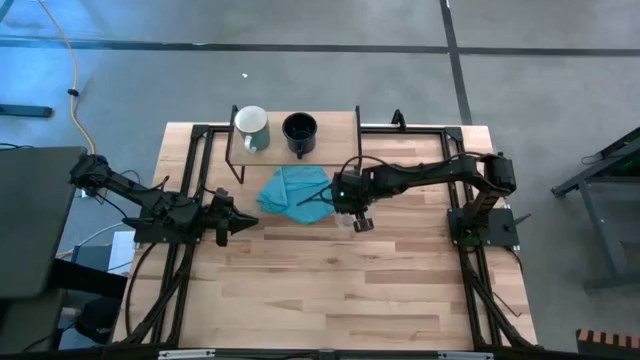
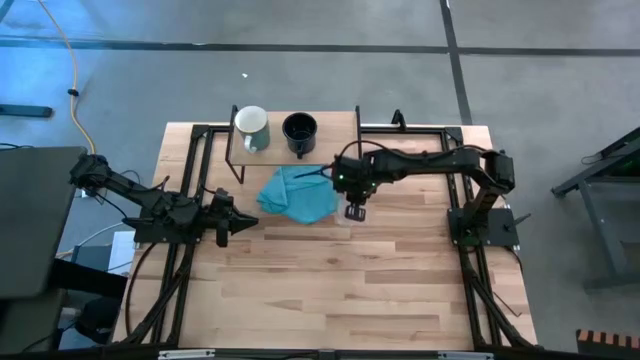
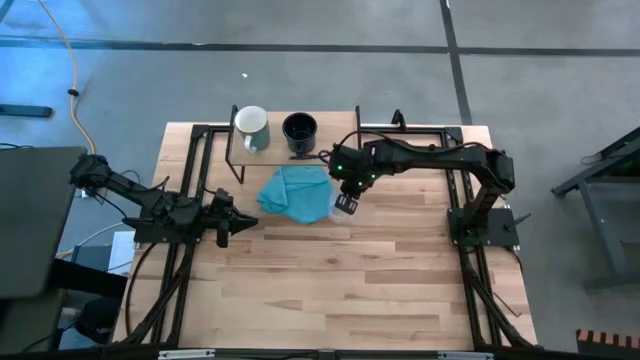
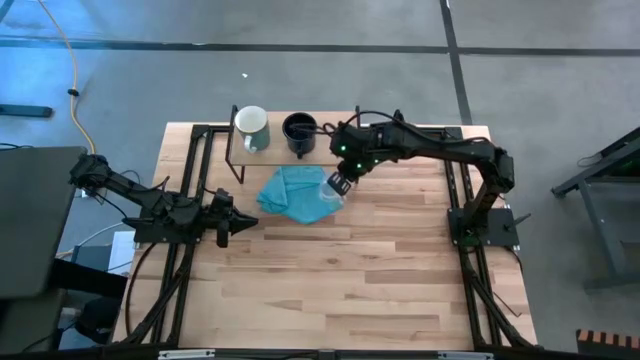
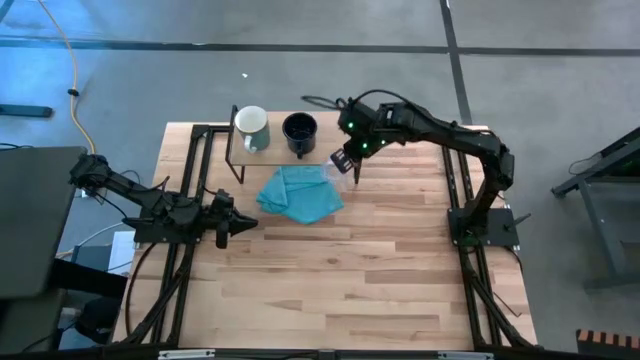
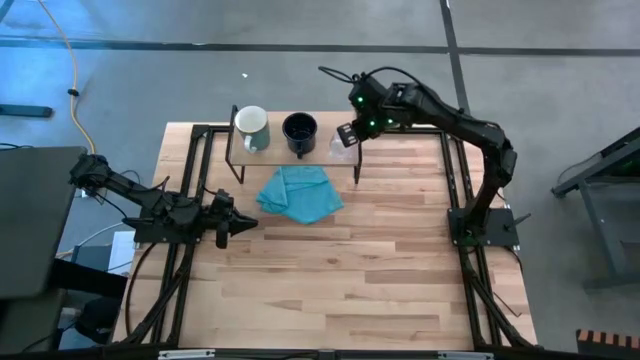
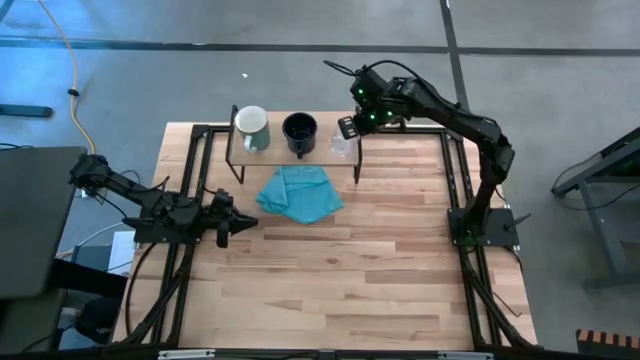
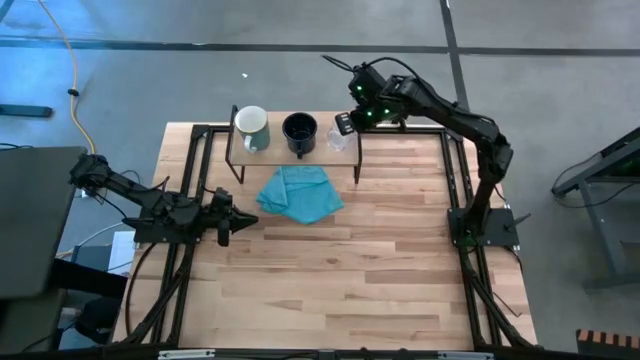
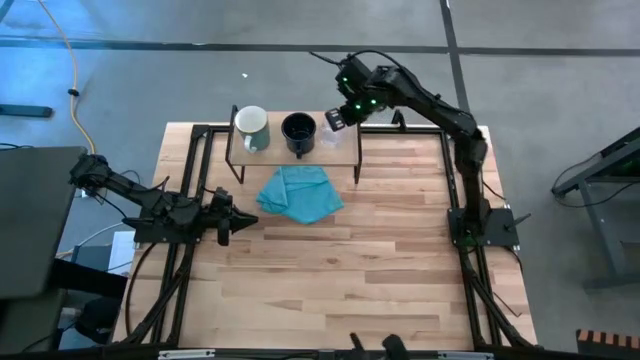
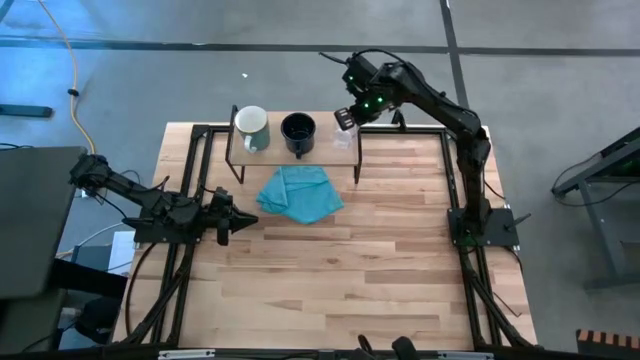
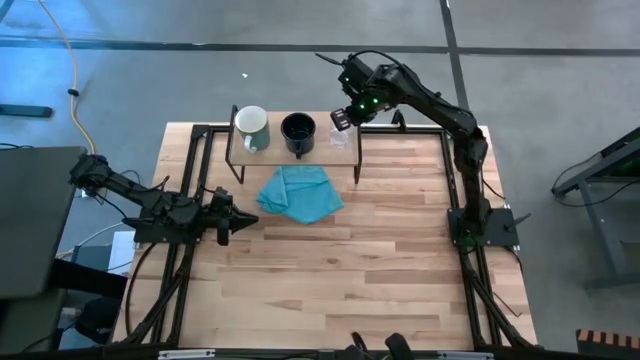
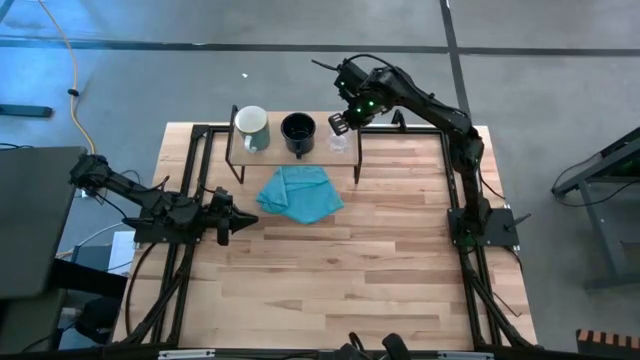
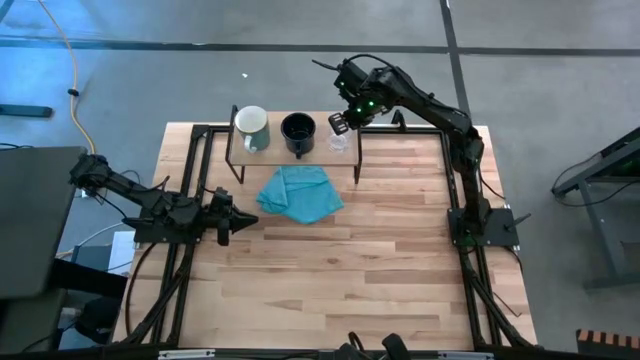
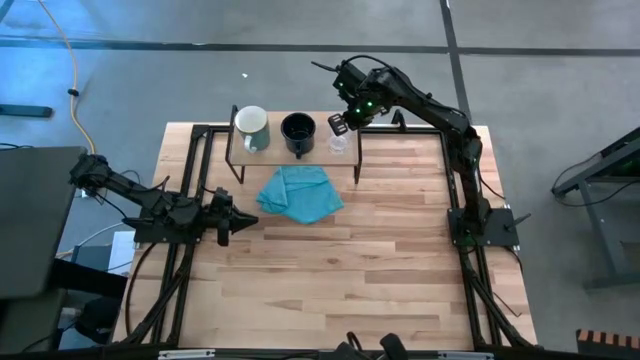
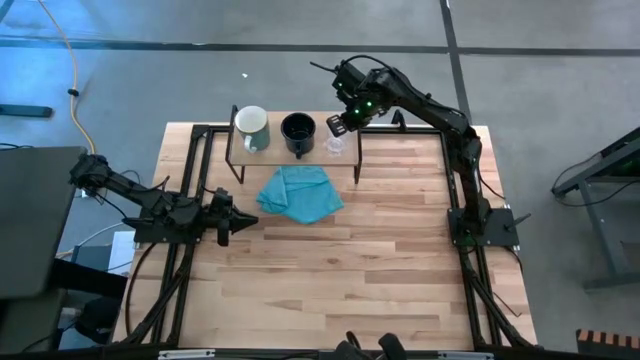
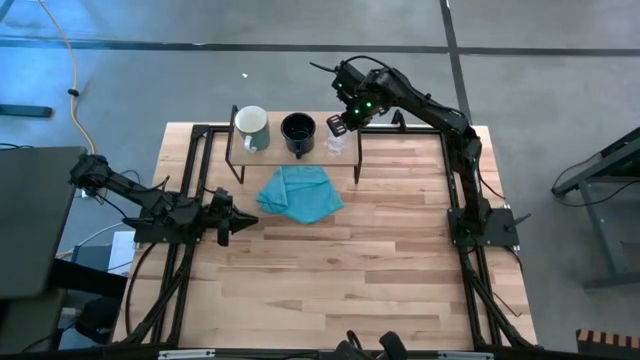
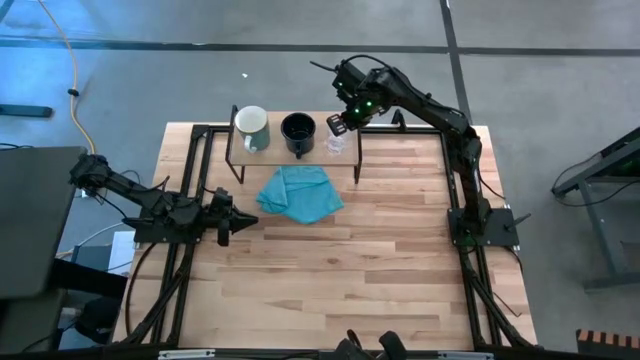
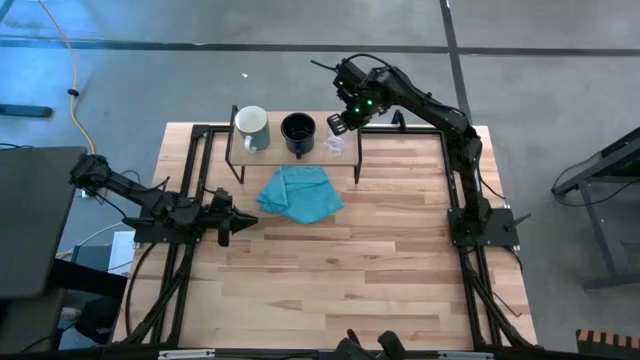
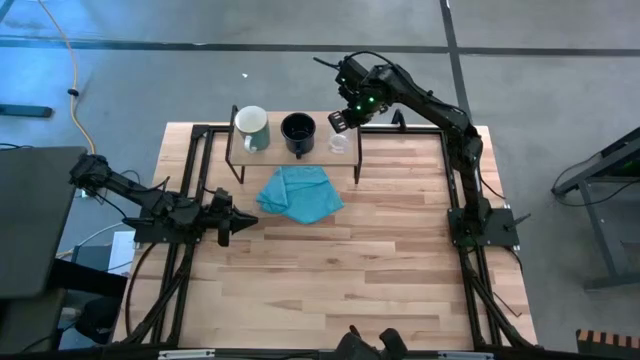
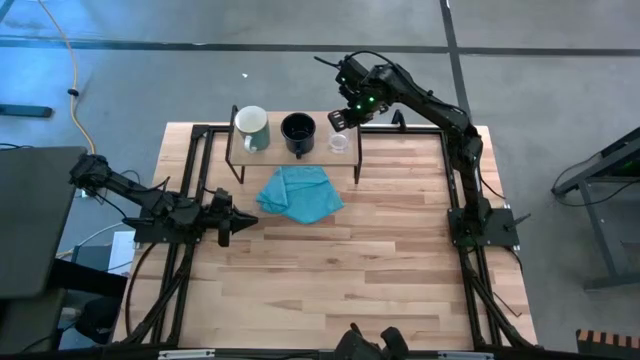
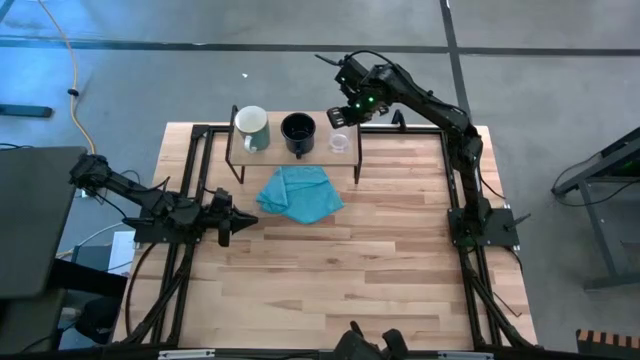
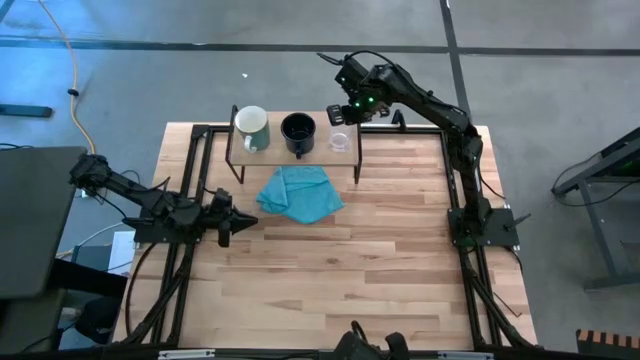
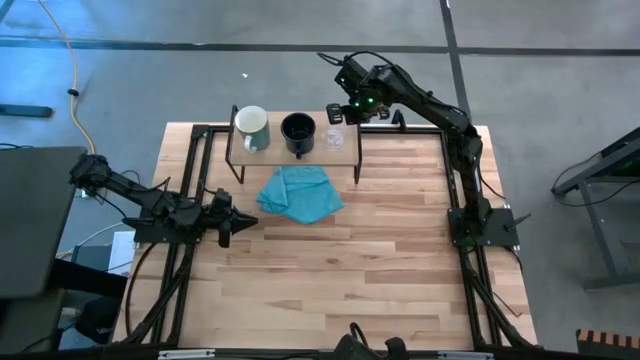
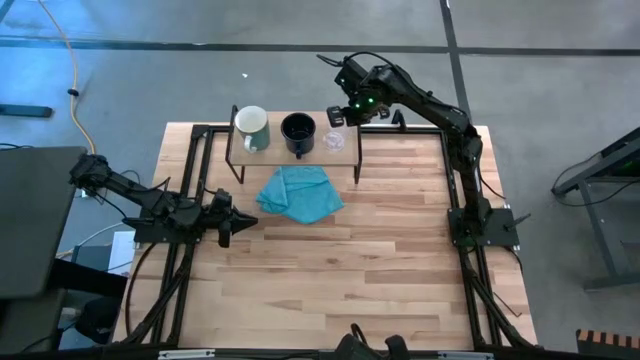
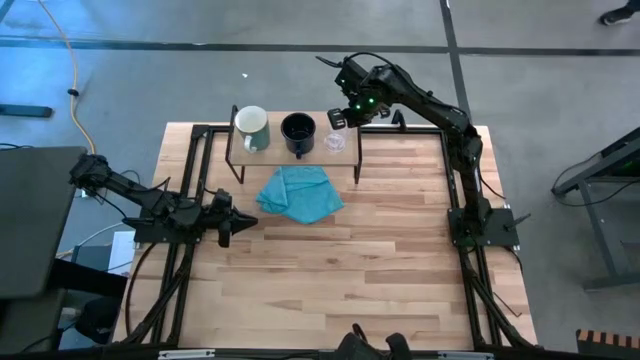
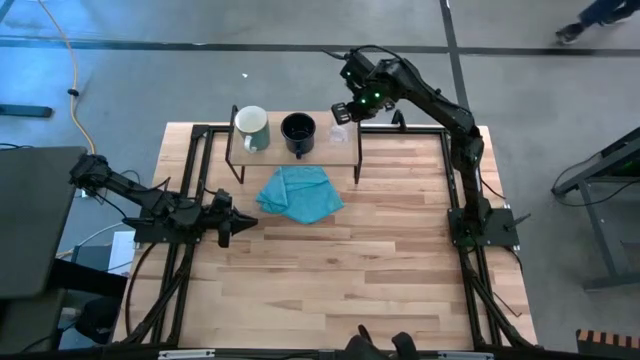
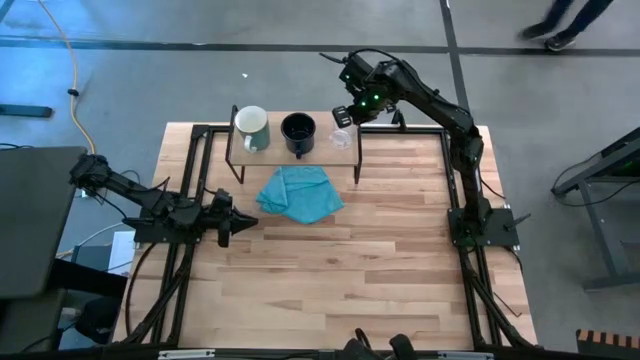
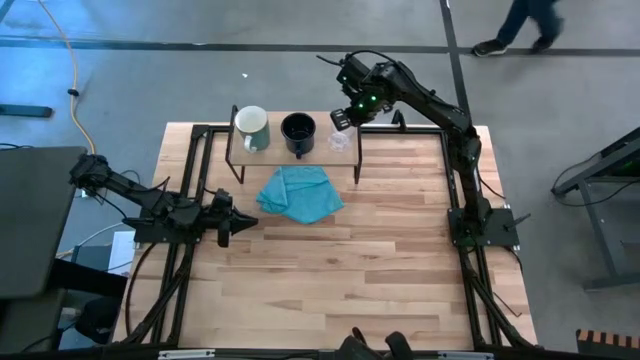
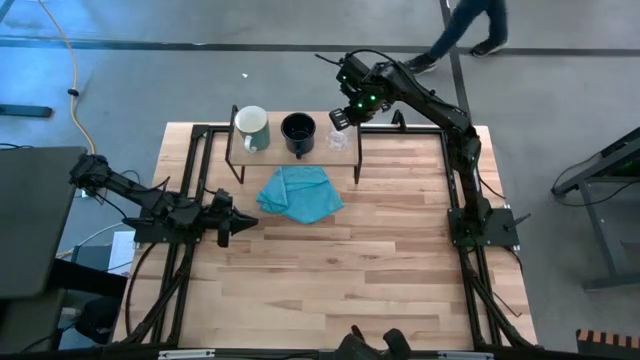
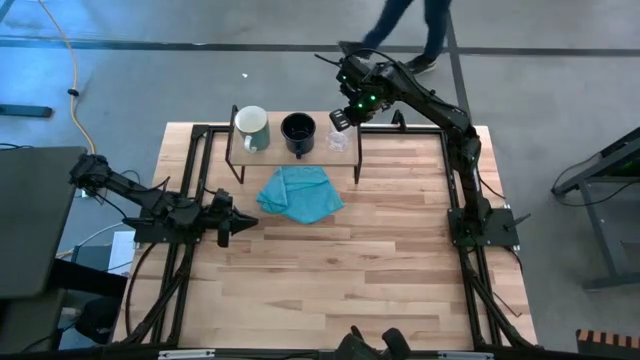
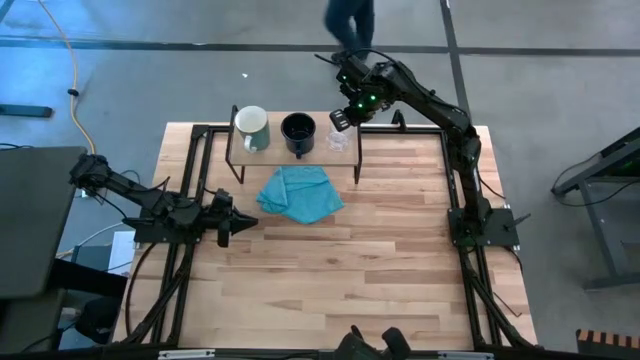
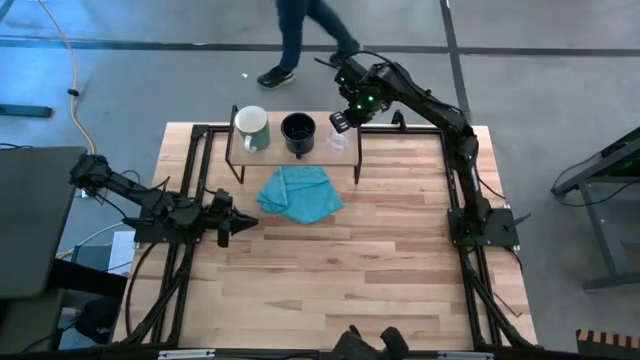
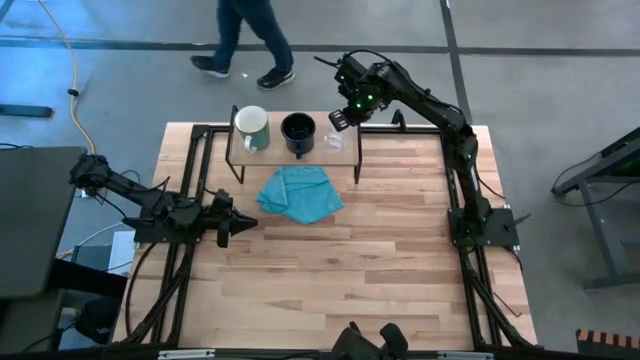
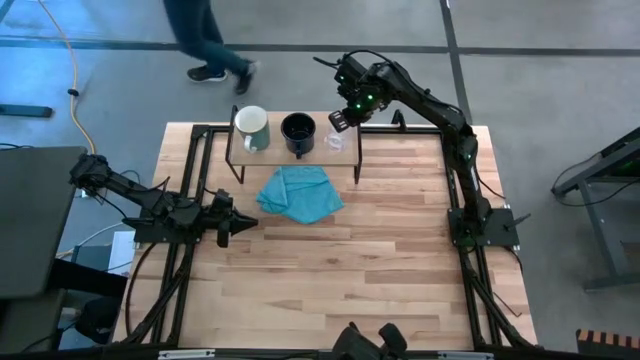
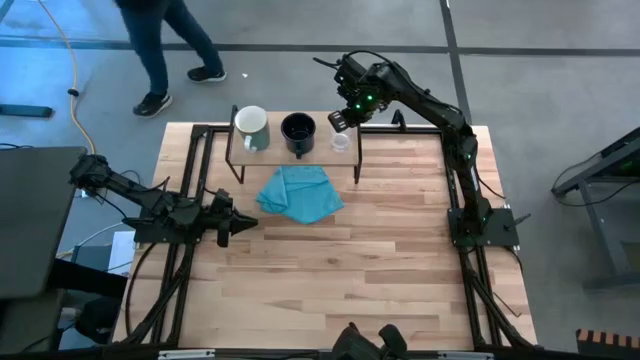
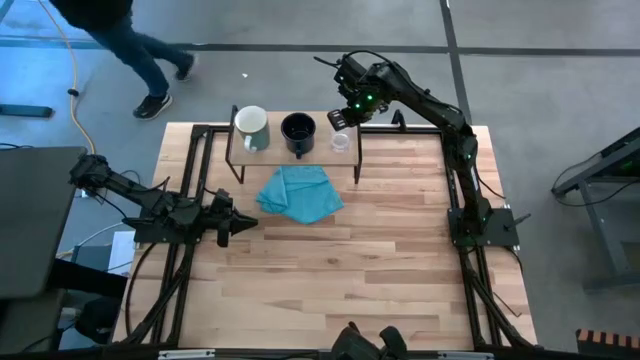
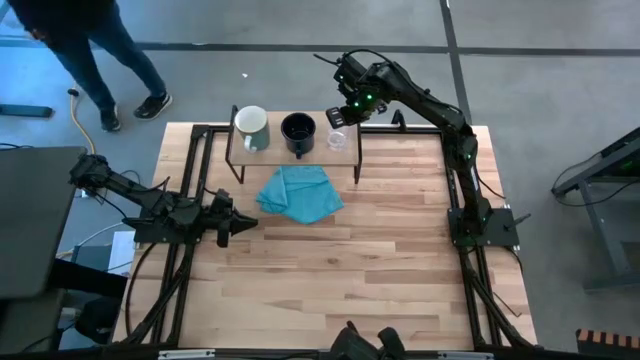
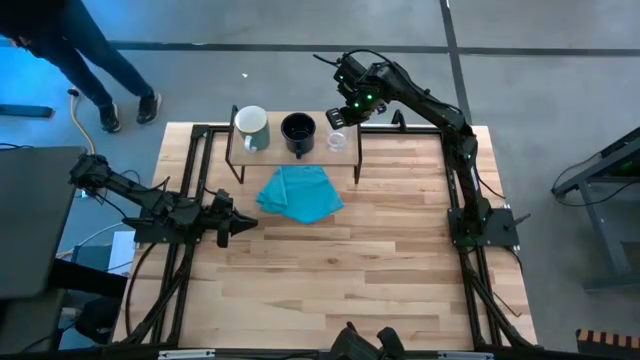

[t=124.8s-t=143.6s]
Task: Stack small to large cups/mugs on shelf
Put the transparent mug on the shelf

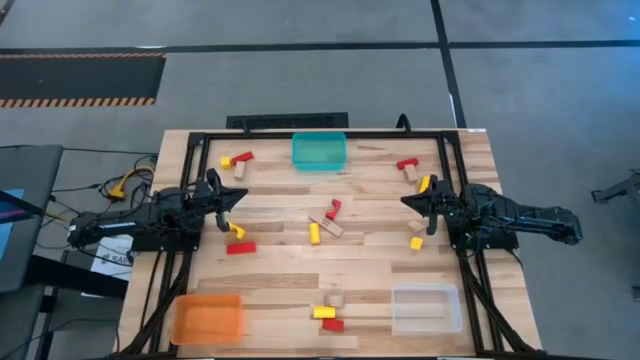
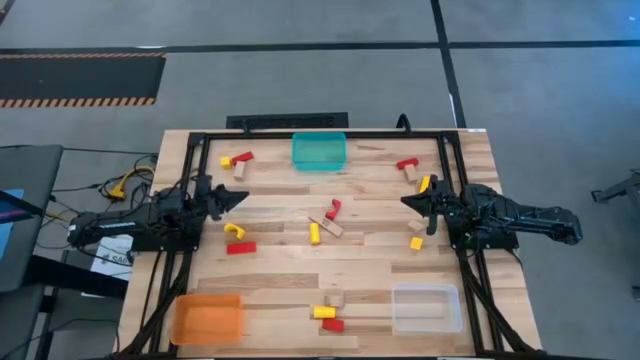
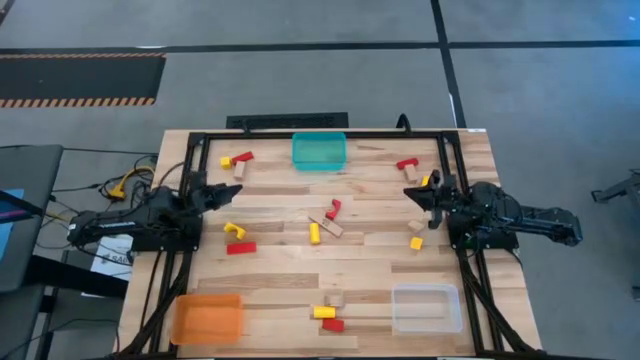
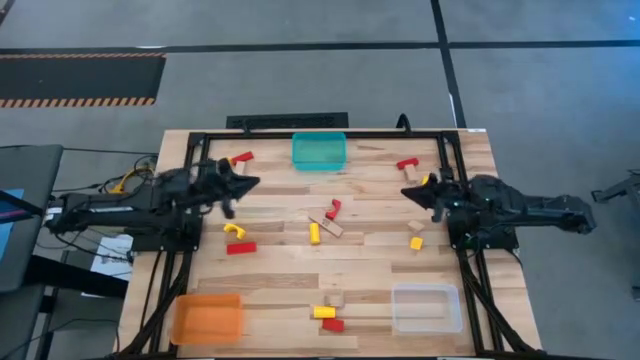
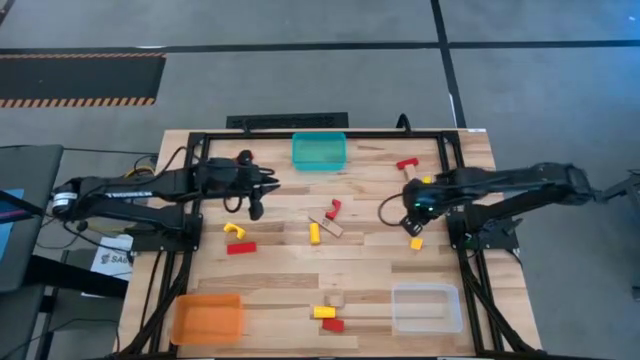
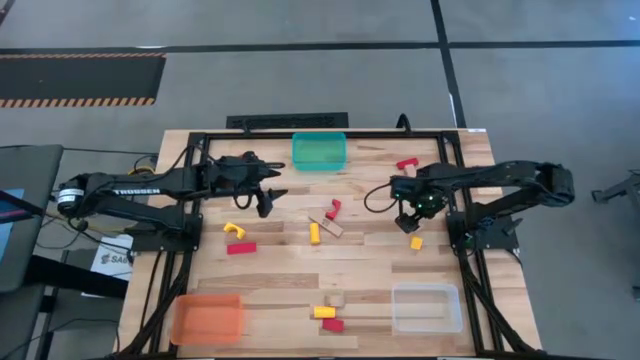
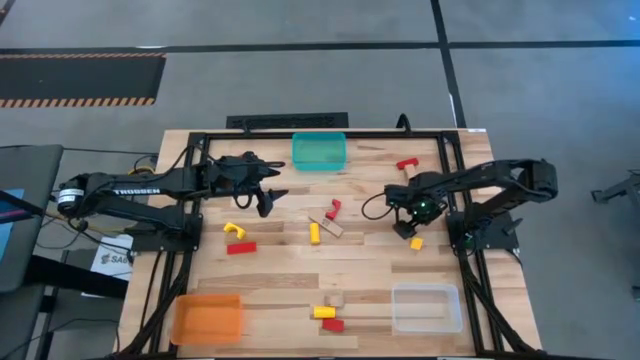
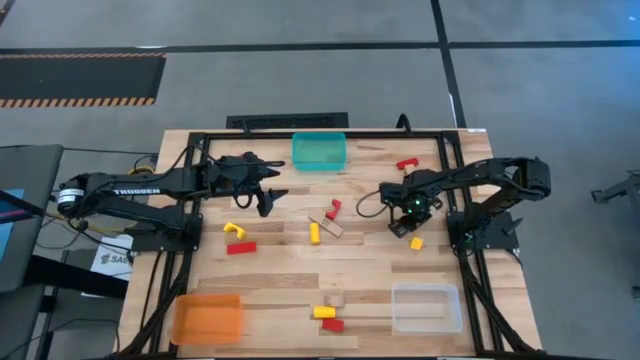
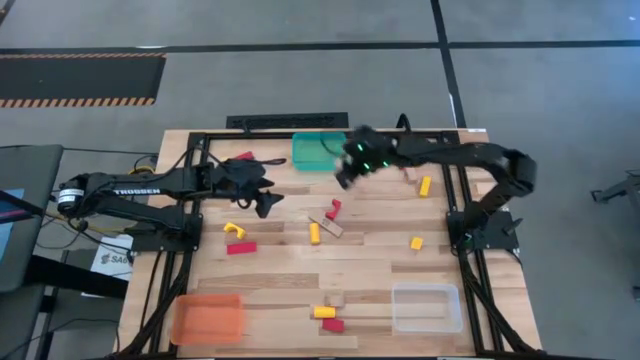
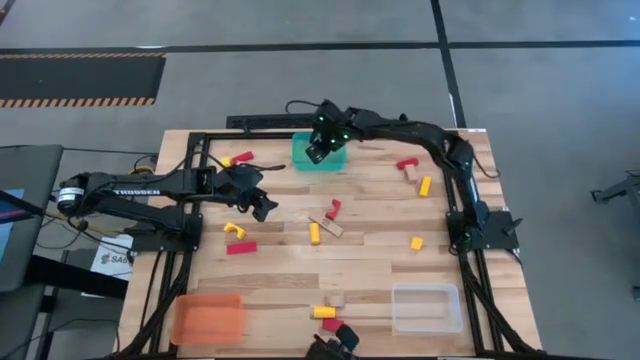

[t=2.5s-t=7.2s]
Task: Sort & place blocks by color
Put the light brown block into the blue bin
